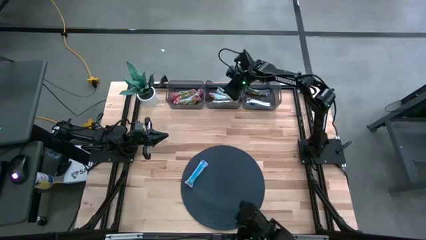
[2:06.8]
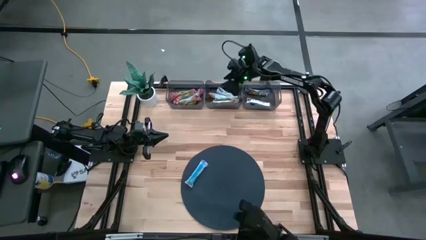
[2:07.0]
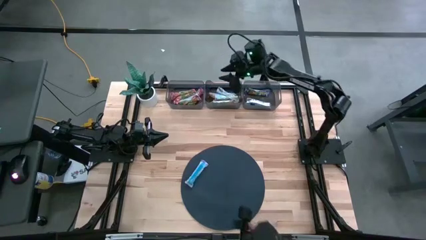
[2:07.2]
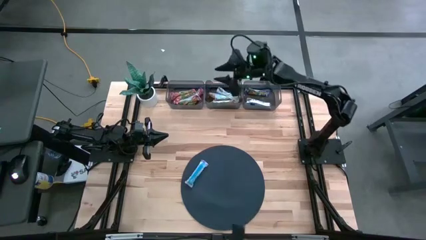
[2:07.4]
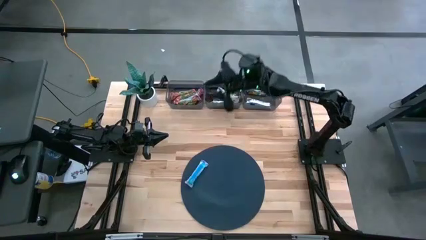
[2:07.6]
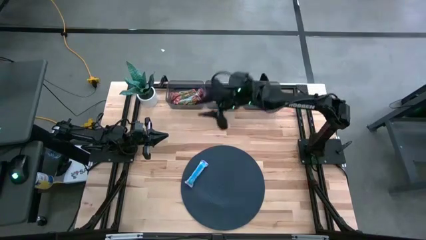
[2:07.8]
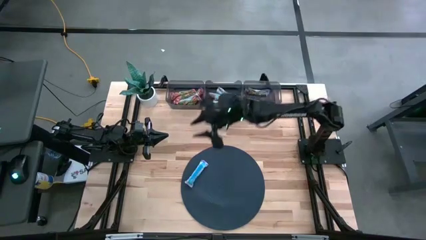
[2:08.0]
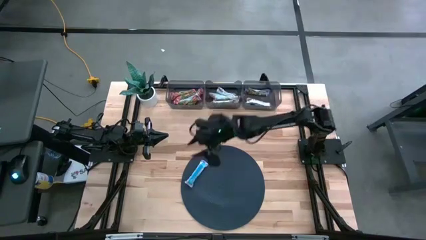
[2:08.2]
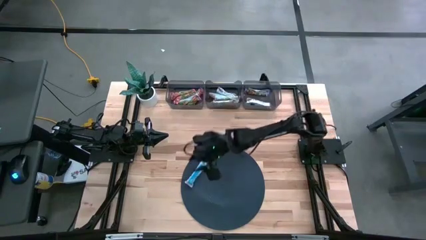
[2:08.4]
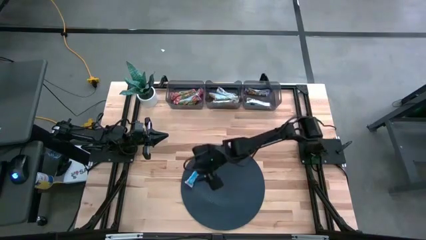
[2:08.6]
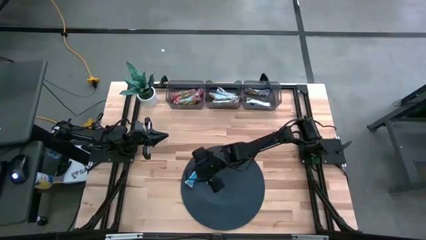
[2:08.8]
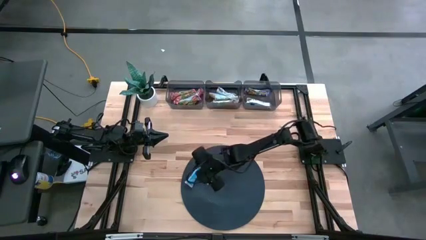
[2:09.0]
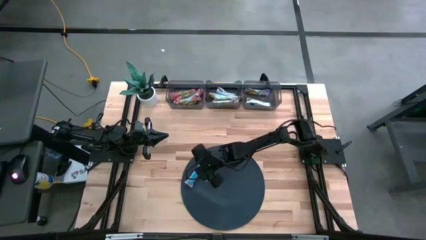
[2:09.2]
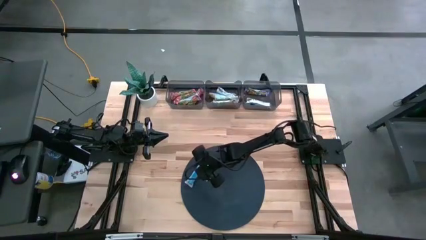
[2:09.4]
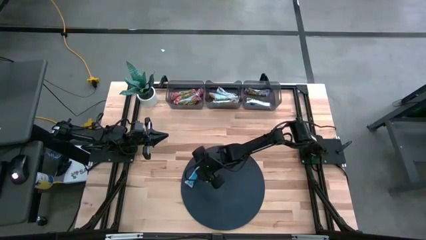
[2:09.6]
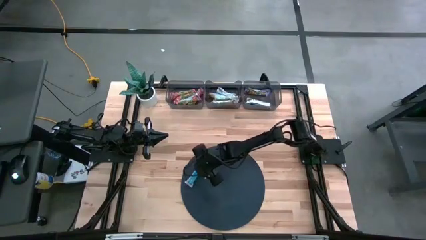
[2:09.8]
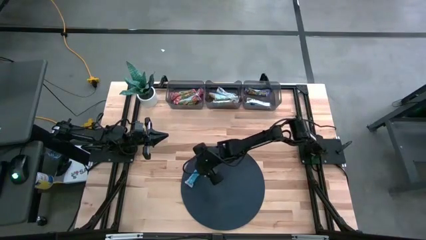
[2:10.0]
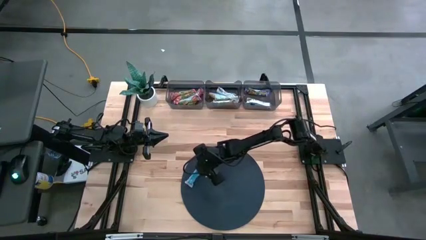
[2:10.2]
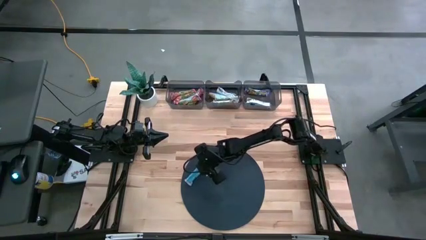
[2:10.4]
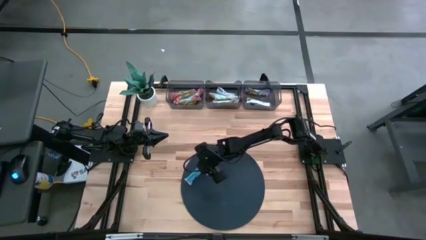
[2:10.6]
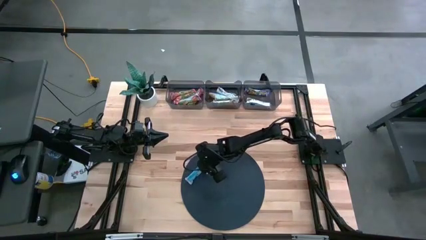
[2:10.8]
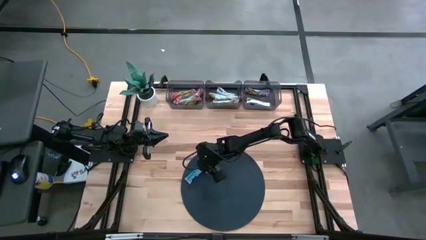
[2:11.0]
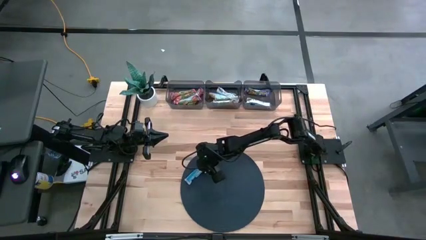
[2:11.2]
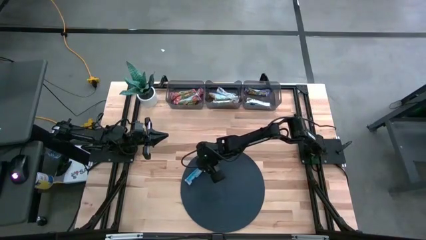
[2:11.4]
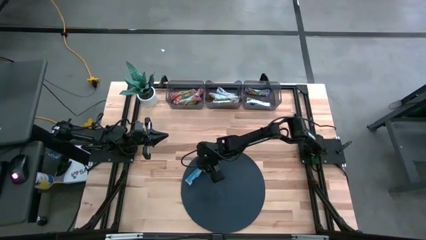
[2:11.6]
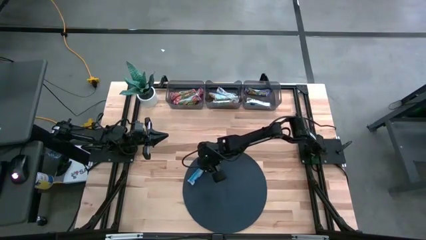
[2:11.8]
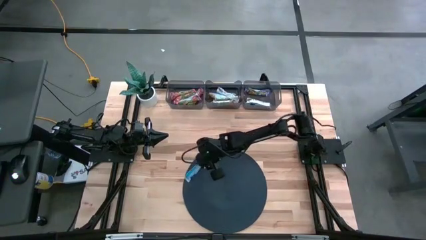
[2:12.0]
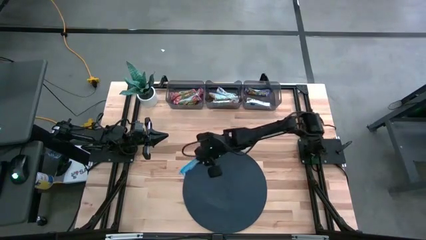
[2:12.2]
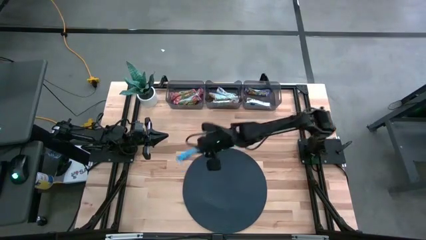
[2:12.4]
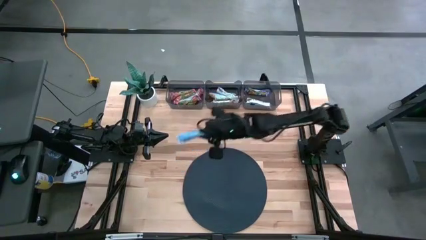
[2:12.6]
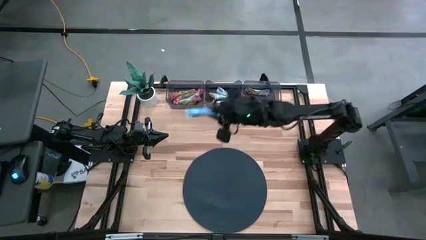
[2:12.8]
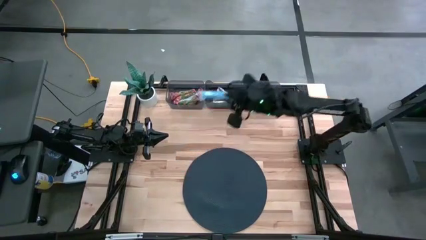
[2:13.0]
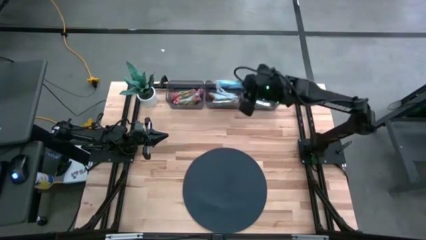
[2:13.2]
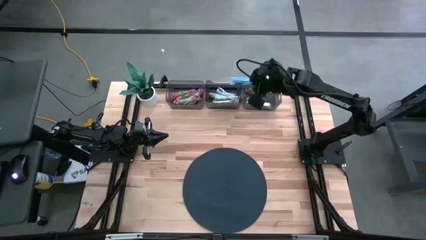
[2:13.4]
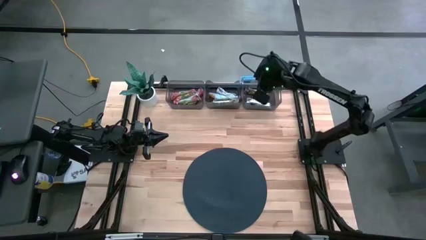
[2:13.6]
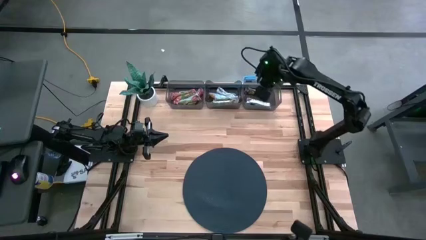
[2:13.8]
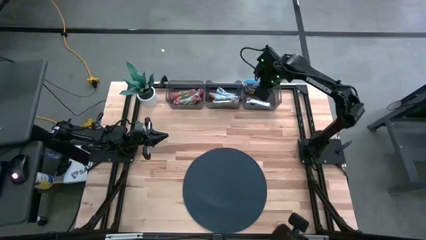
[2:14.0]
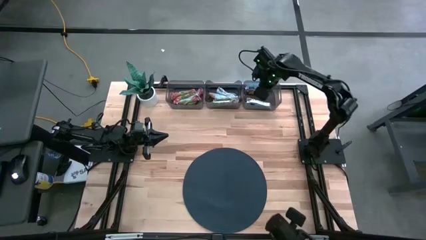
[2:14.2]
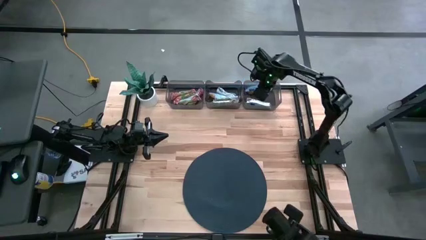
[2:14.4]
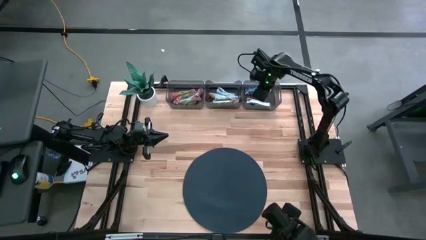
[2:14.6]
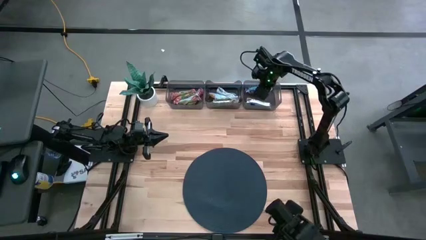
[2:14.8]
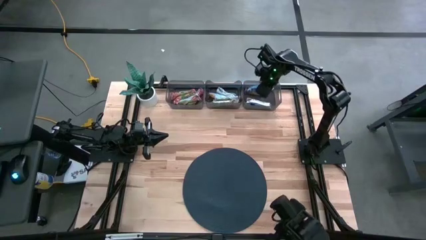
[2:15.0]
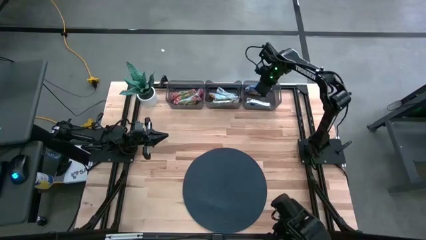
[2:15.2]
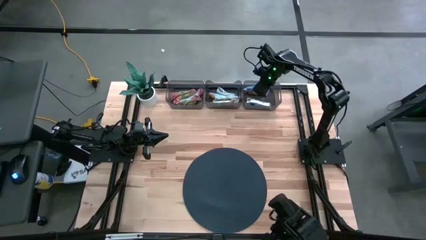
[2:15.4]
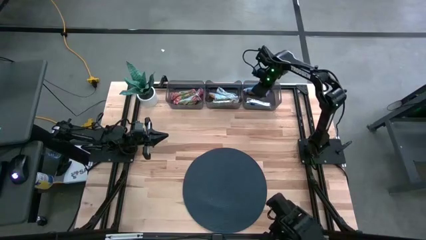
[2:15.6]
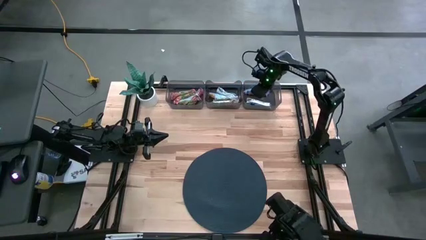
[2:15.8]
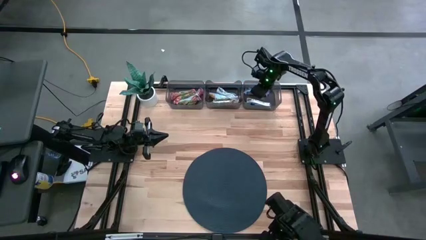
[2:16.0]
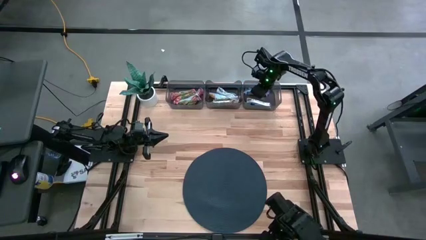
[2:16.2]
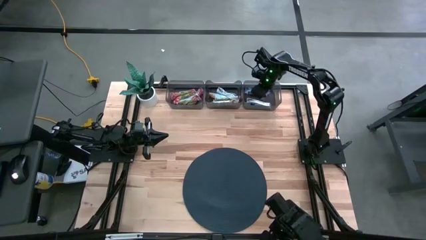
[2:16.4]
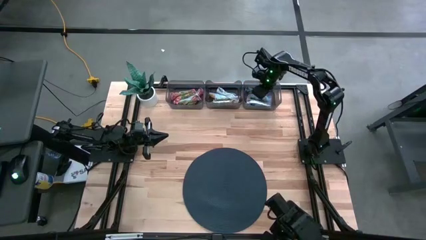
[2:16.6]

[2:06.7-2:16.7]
Task: Pick and place Granola Bars by type
Put the blue granola bar into the right black bin

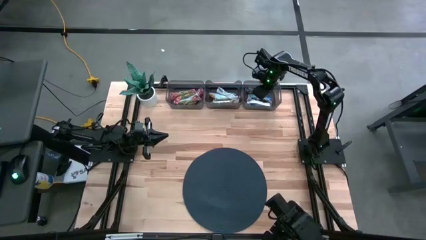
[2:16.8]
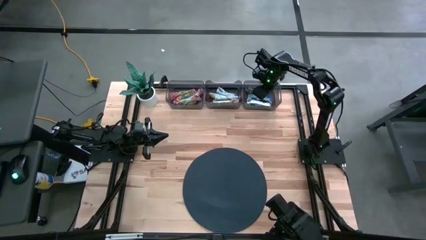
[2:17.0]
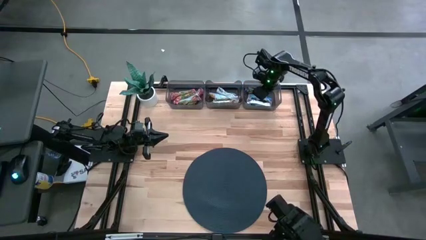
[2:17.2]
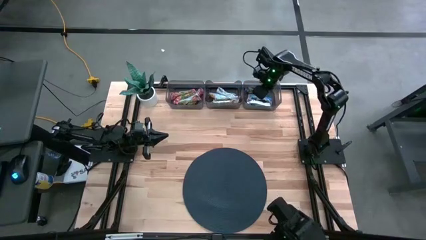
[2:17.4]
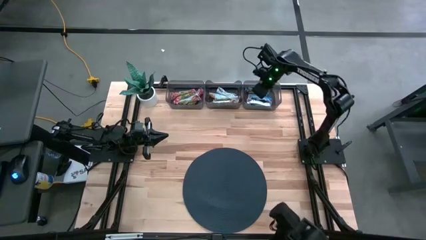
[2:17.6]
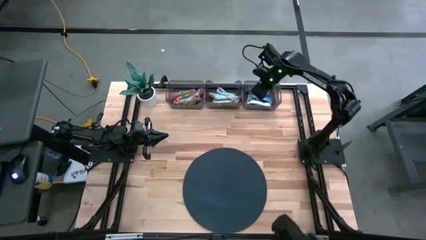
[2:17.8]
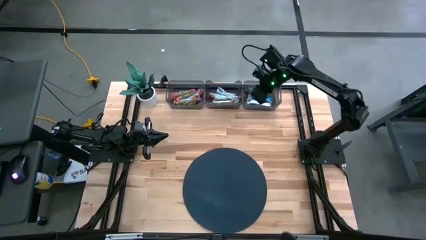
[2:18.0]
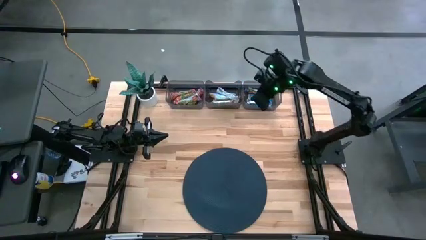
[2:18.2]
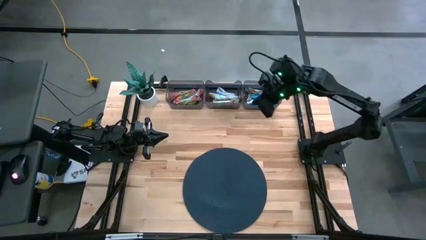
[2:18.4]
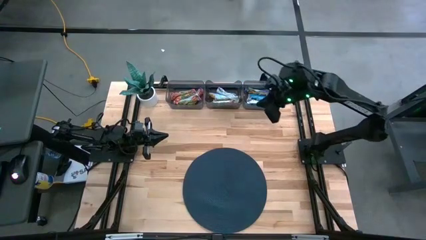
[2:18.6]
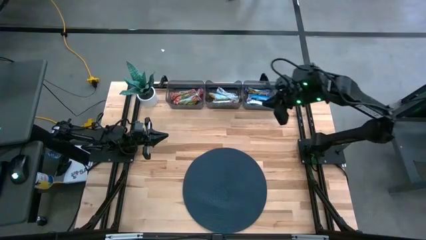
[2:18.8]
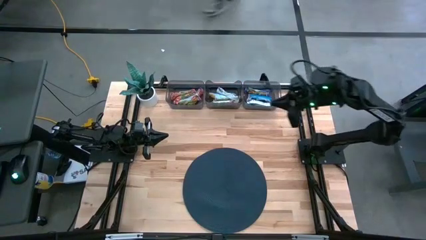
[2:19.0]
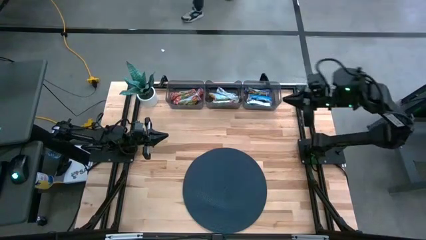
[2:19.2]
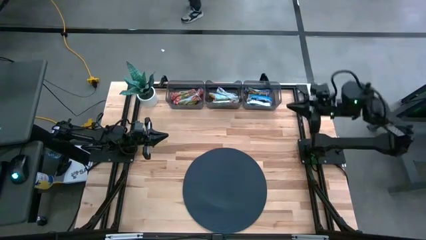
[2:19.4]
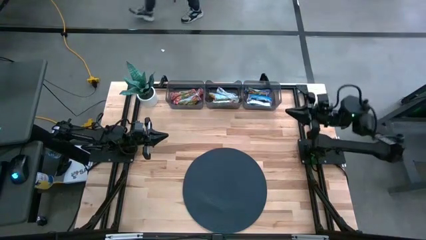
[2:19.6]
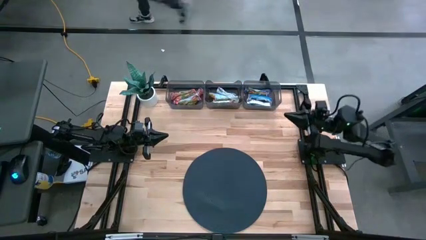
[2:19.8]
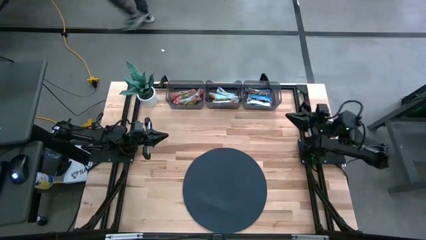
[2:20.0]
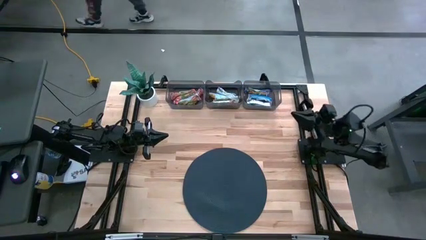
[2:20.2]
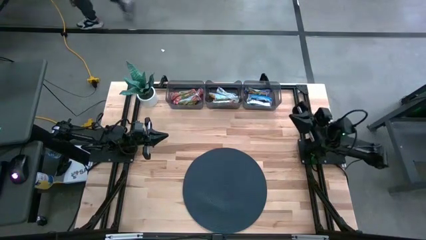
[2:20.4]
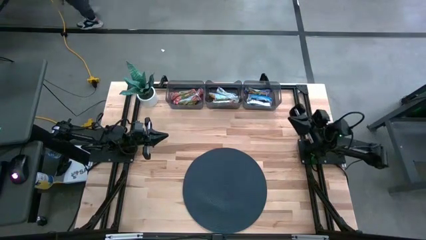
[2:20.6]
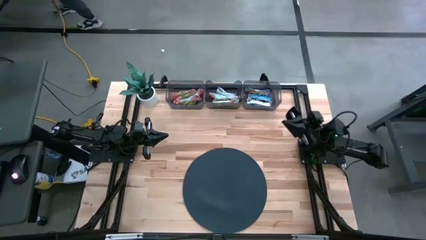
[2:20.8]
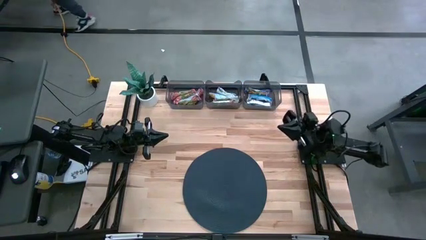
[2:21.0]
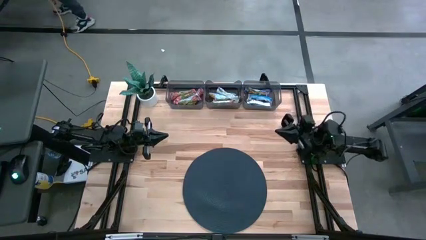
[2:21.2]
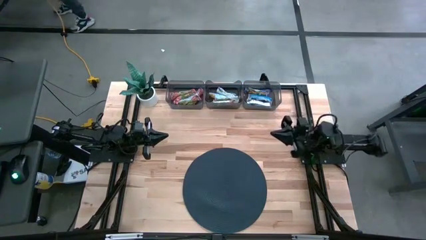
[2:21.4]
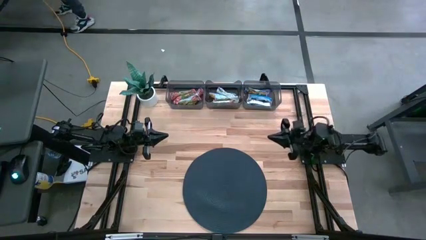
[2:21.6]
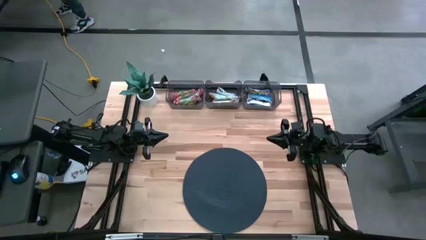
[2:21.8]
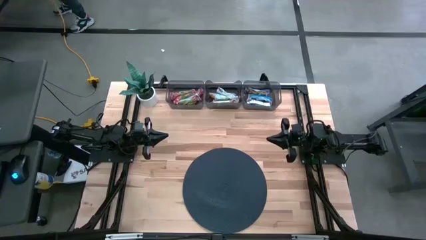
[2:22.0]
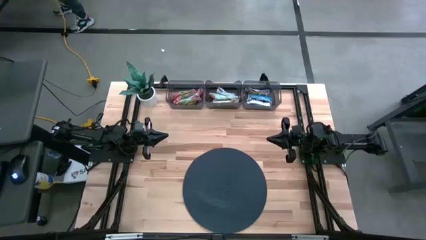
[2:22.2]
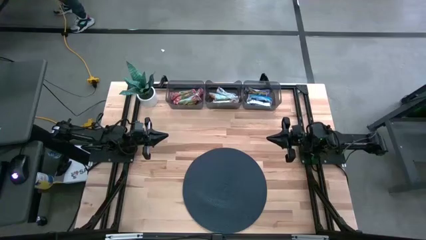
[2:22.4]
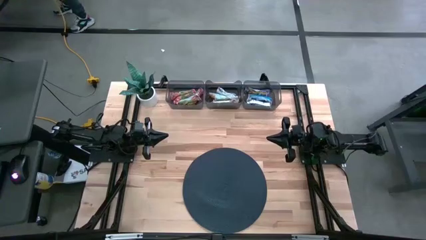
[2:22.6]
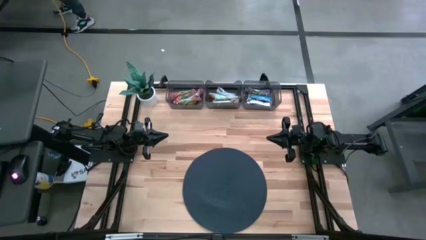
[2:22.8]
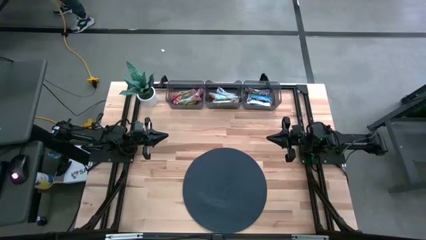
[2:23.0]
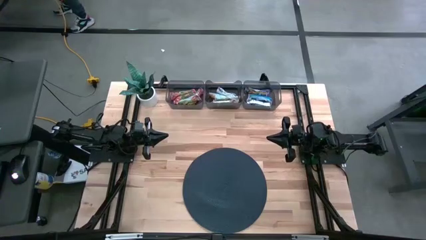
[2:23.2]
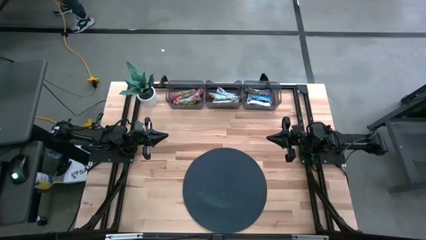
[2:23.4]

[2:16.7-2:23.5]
Return to Home Position

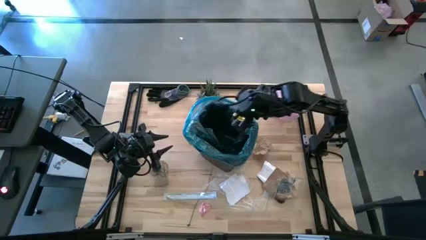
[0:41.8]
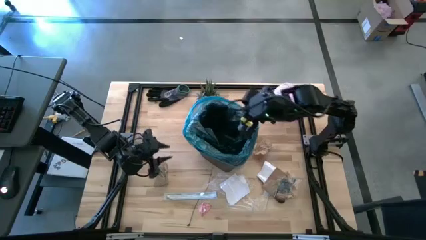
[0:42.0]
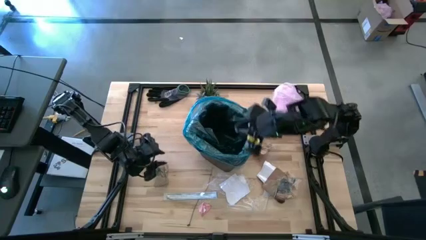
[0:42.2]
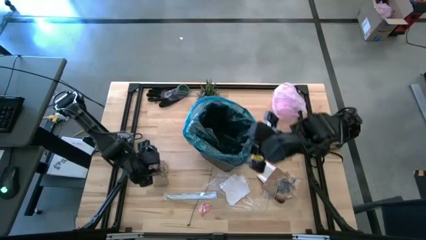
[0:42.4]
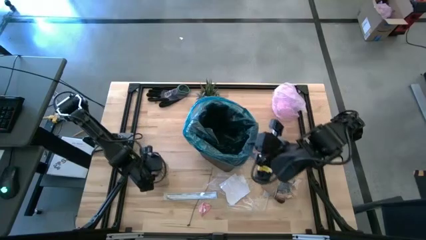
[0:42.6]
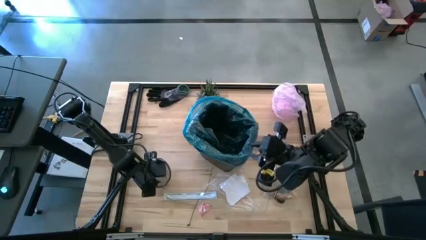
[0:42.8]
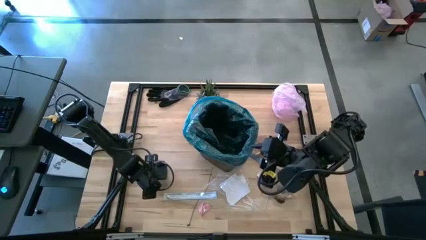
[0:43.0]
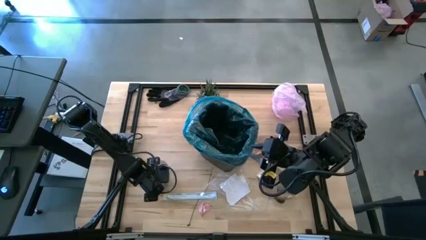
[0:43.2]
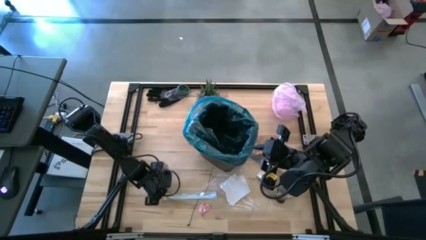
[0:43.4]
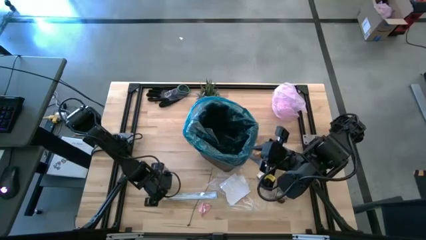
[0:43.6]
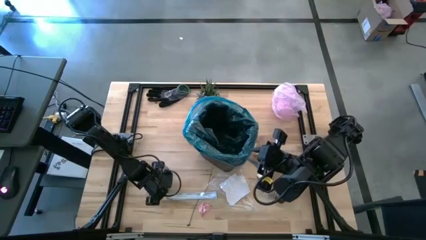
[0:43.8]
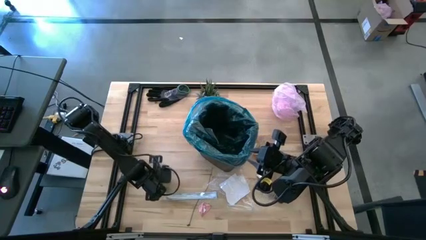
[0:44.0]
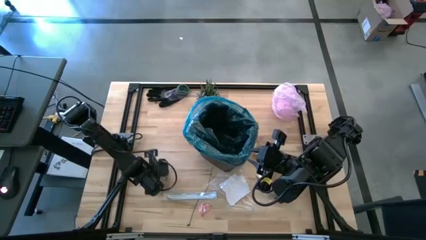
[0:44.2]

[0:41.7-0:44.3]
Task: place trash/remove bag and relplace
Put the brown napkin into the trash bin
